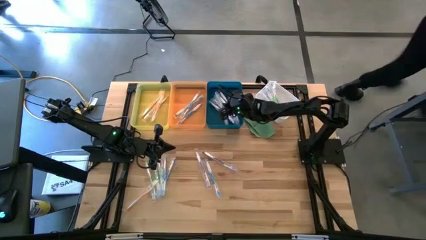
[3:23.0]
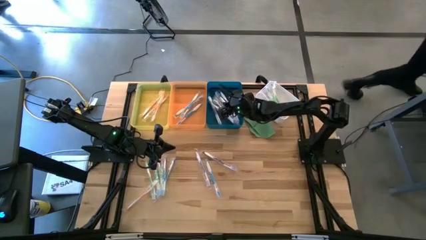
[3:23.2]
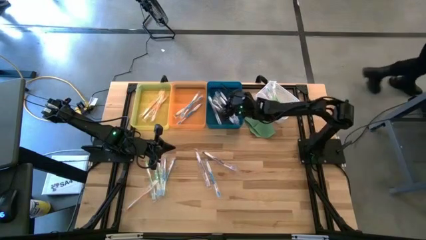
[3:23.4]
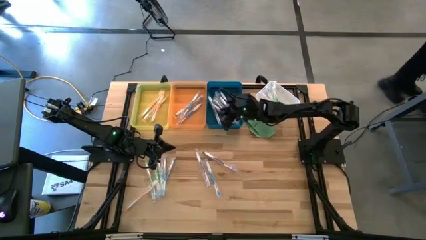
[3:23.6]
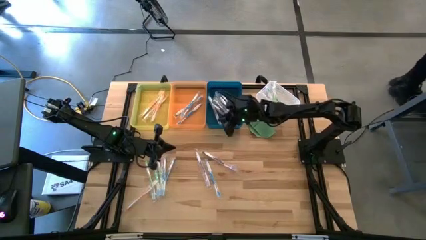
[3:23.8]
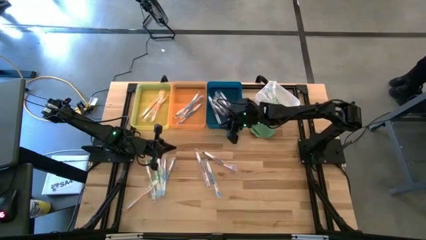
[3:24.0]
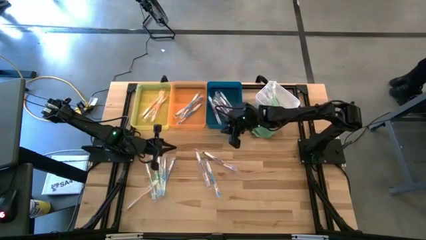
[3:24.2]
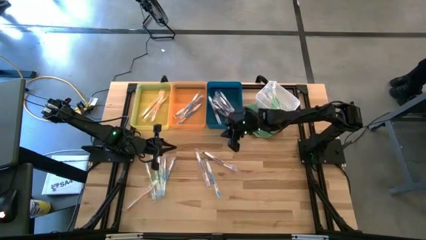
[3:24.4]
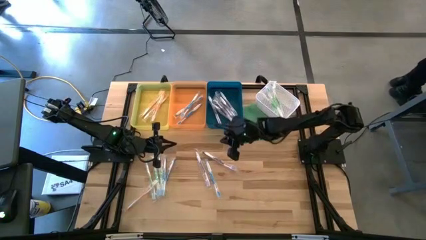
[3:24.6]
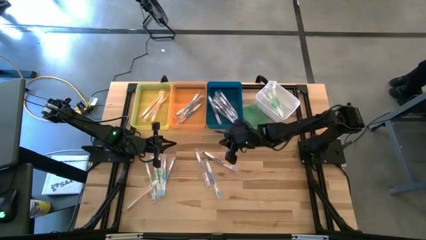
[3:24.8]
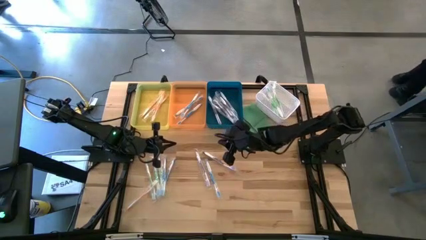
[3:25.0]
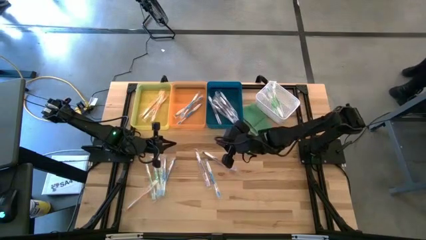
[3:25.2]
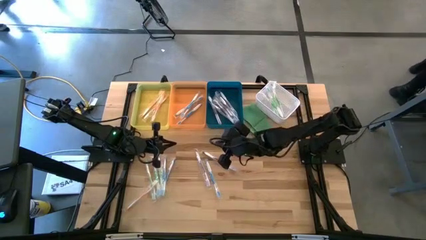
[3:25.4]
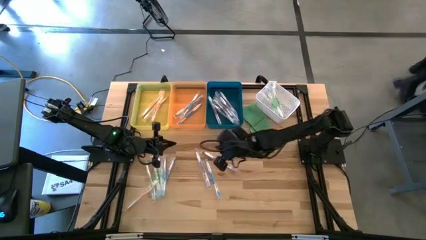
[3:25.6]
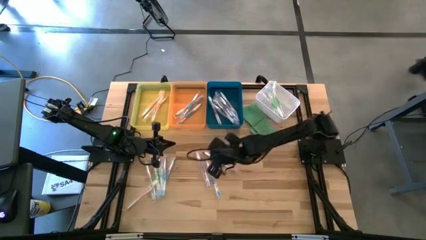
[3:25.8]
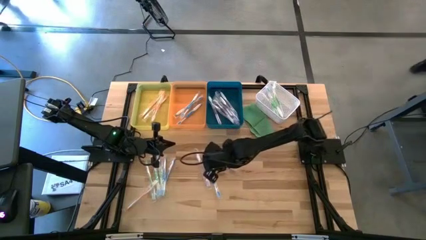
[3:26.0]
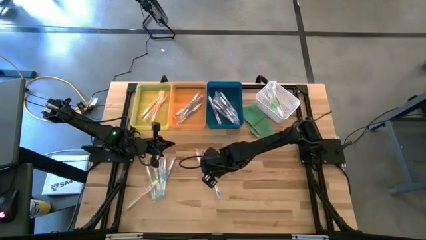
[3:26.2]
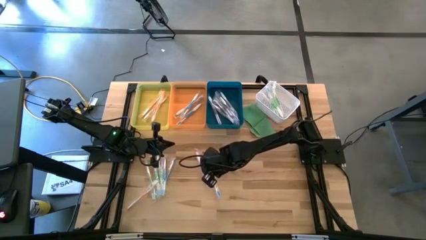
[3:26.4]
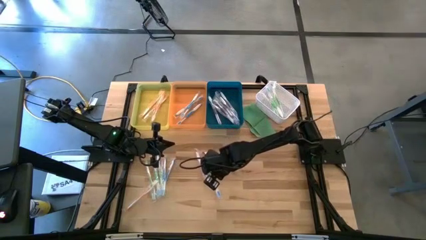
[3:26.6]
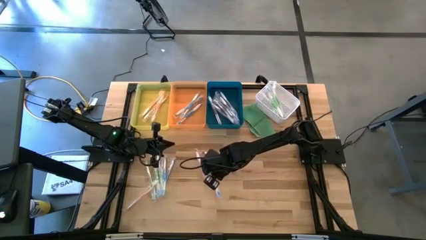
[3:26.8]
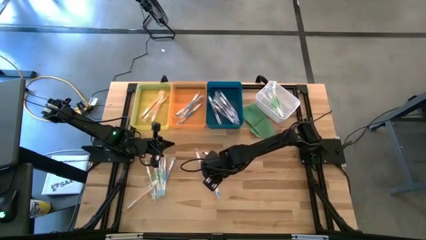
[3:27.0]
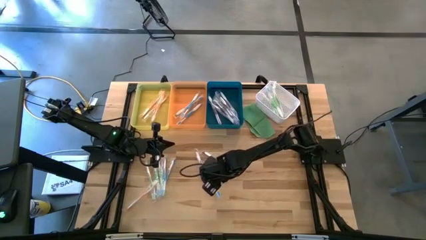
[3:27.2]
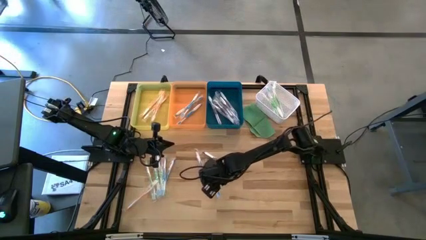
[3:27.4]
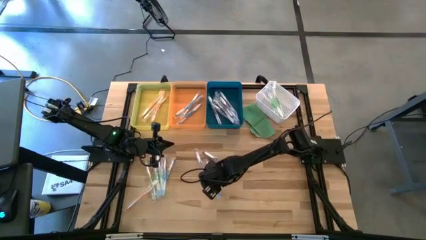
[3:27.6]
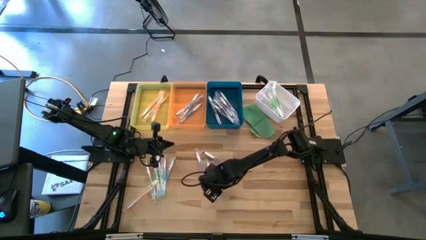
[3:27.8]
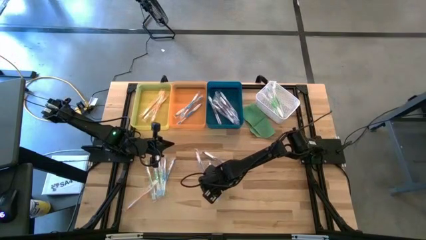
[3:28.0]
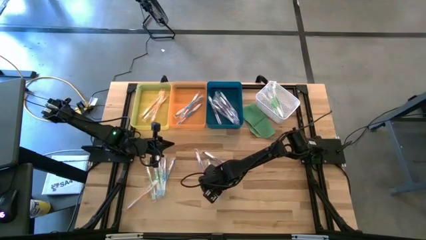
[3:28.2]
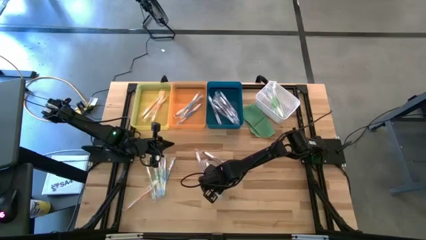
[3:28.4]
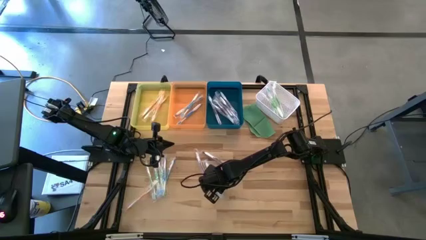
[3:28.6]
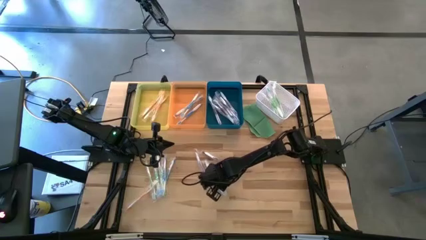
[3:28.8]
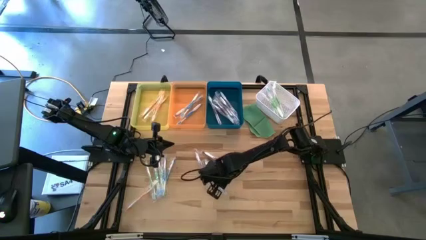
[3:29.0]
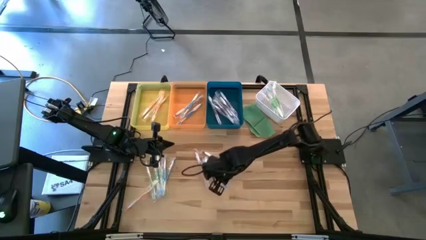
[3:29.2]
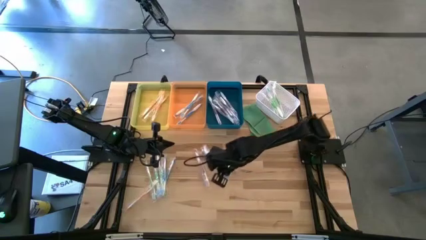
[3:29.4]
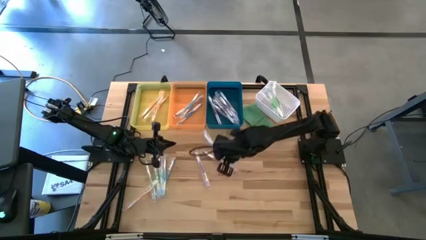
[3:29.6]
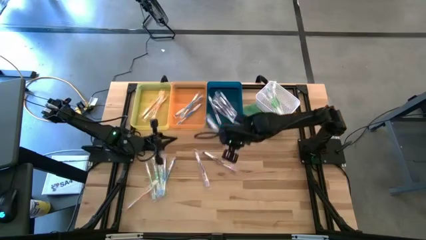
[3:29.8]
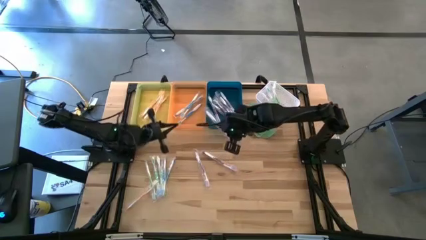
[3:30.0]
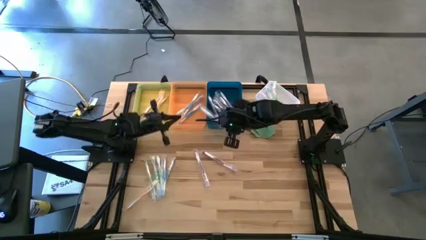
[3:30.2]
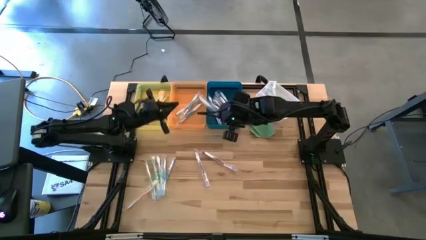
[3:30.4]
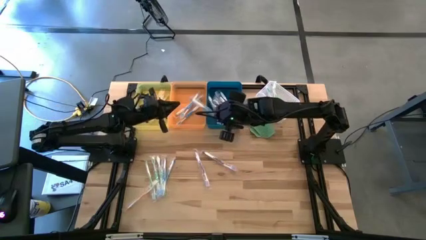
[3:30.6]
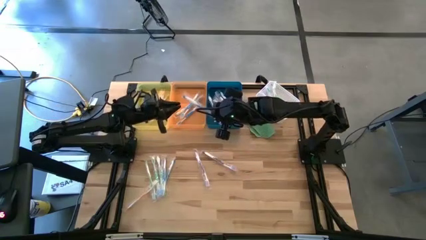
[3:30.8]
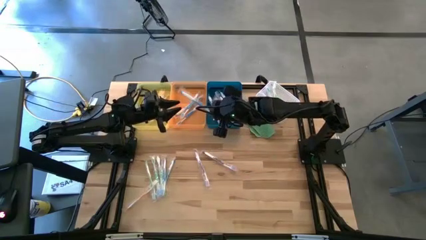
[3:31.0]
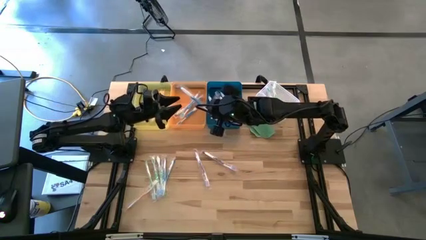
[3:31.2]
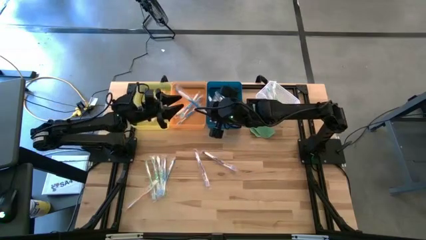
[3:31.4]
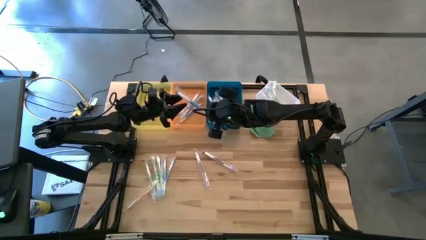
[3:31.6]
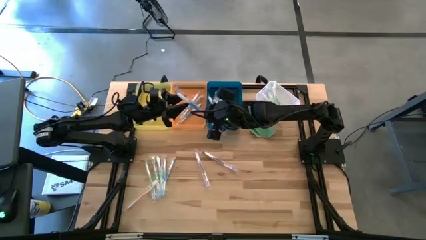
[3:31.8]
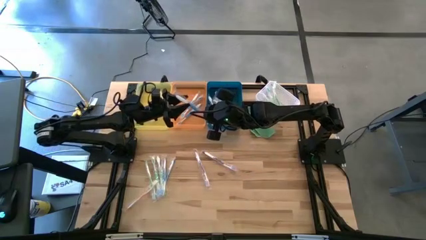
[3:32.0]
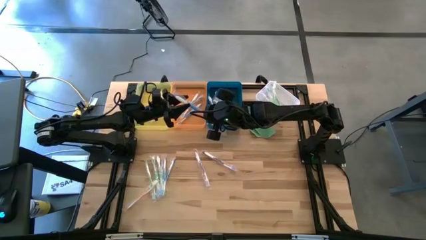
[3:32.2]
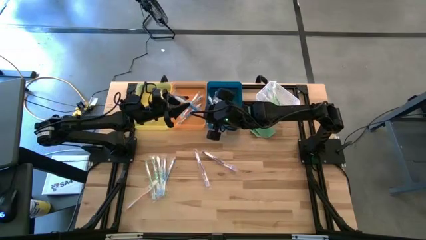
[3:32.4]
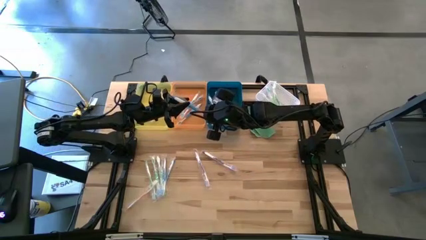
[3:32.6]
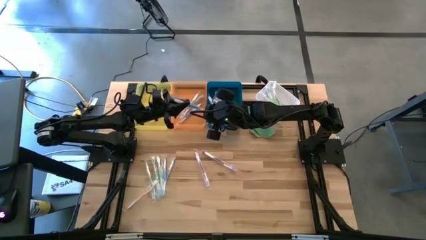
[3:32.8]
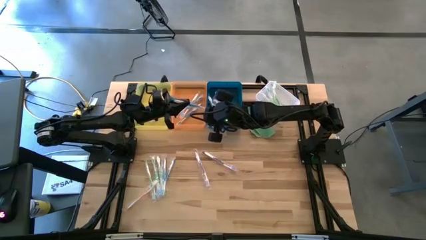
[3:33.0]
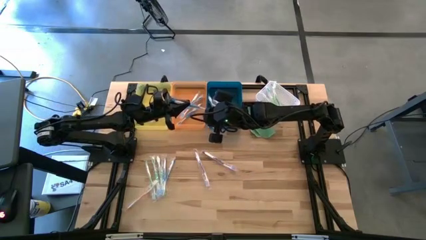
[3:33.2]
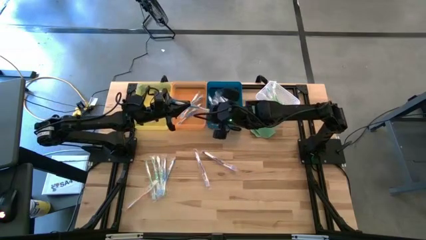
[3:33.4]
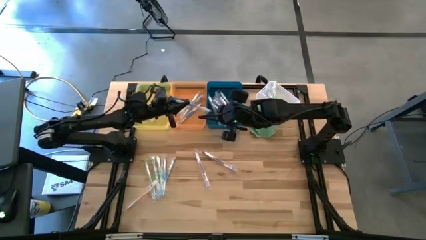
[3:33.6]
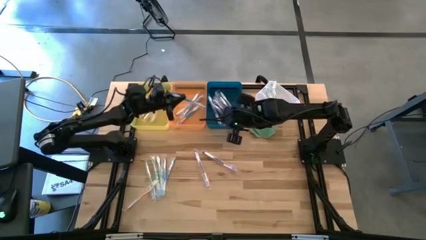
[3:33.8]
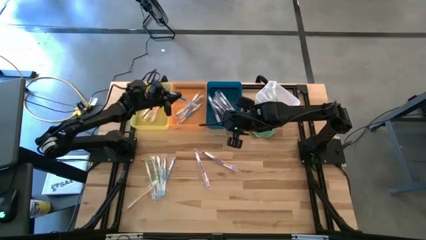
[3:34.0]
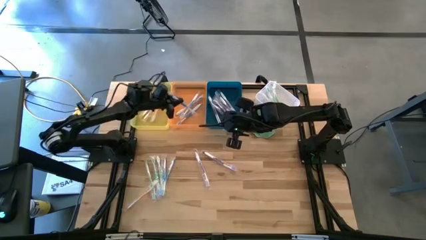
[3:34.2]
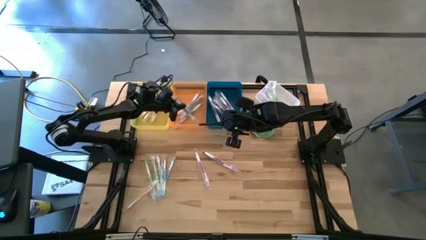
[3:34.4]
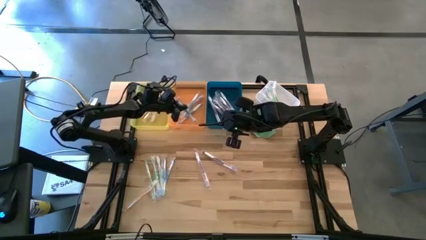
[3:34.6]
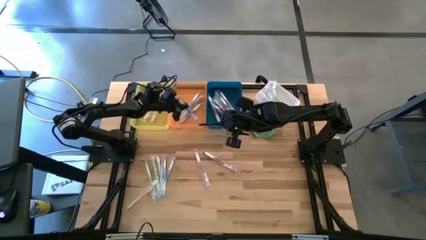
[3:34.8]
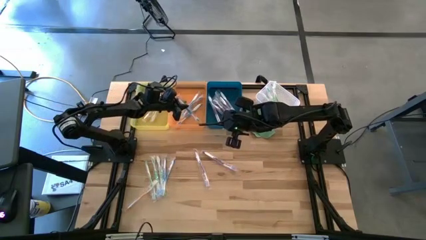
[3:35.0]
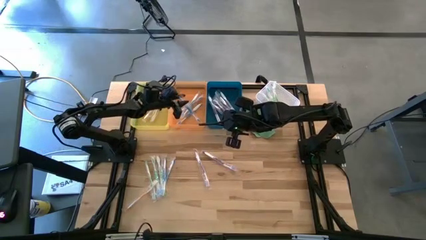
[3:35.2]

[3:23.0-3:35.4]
Task: Pick & Place Toothbrushes
Put the blue toothbrush into the orange bin

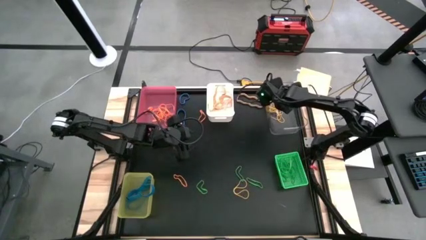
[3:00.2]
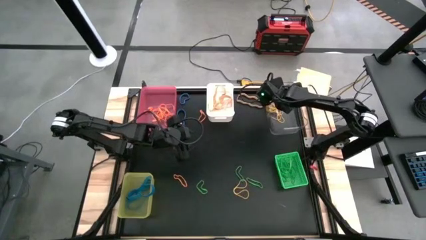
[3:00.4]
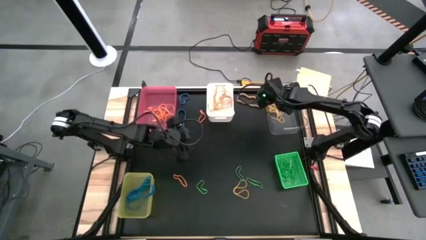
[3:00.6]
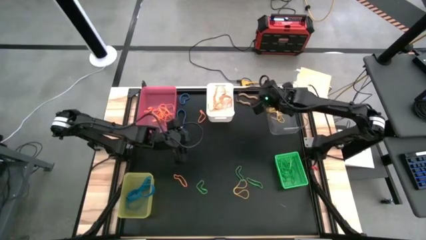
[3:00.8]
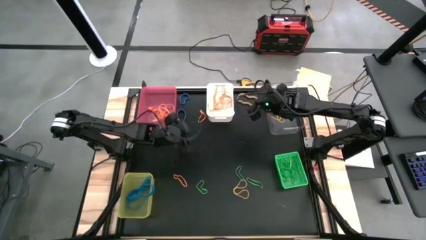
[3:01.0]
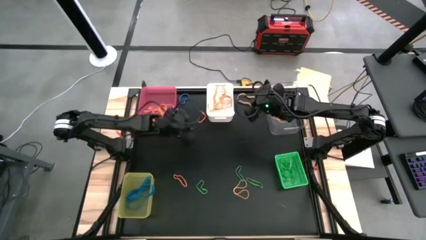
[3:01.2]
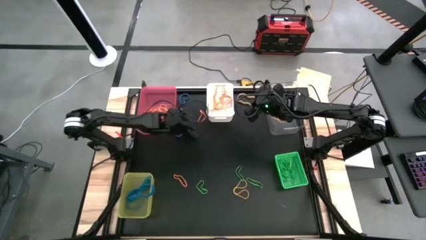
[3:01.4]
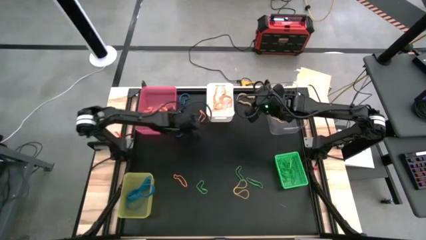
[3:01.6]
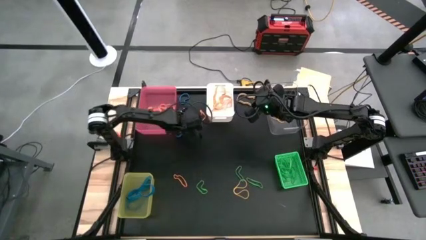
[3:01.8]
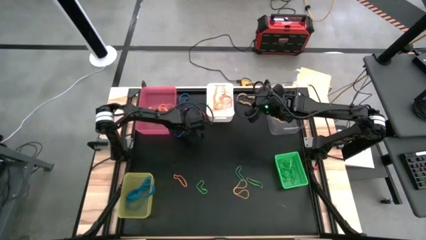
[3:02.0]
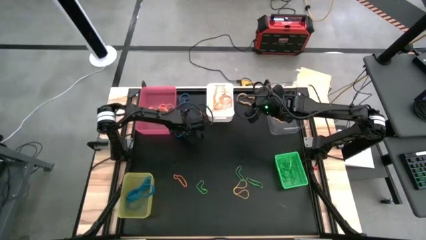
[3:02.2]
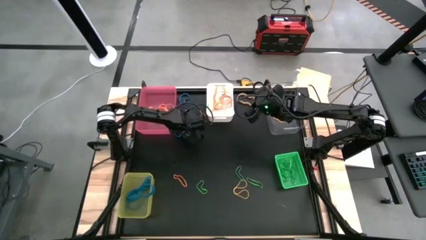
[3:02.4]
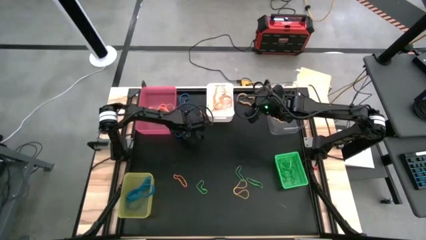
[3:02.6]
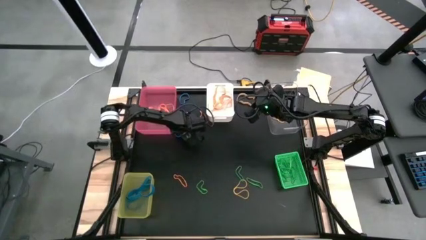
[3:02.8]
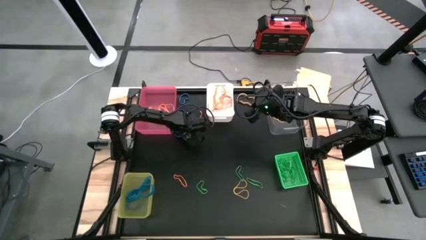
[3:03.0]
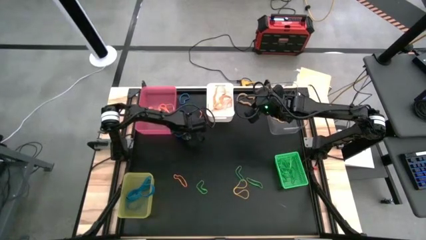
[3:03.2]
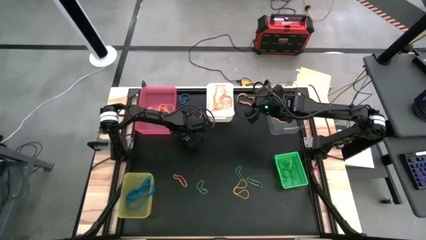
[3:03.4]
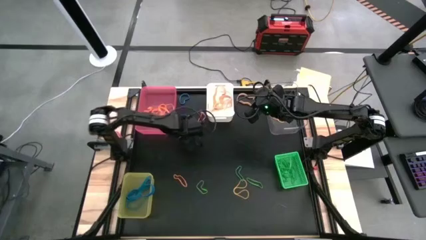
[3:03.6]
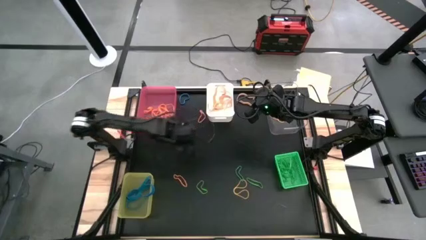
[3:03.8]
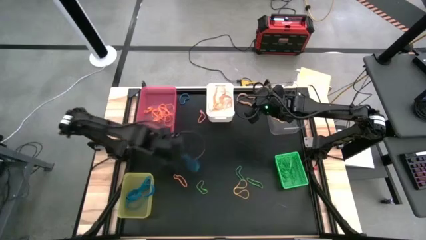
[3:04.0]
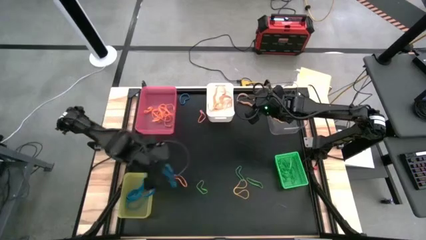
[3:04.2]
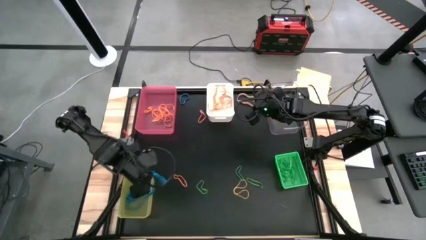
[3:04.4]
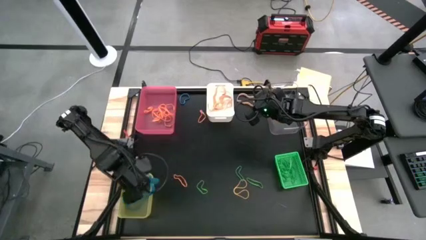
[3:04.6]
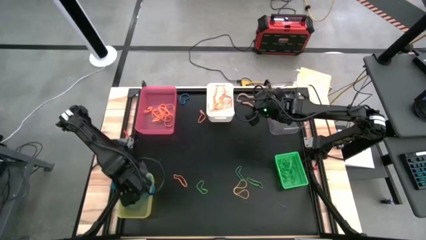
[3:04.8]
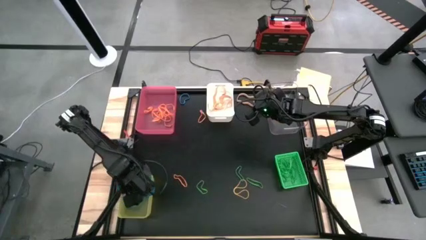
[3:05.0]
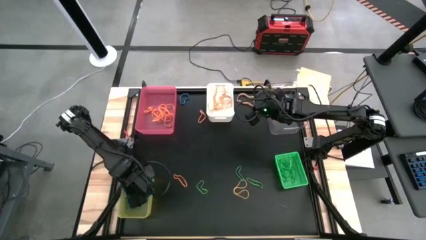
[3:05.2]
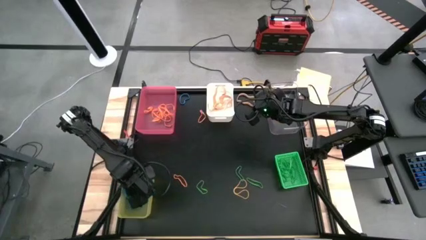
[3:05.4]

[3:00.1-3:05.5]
Task: Sort rubber bands into baskets
Put the blue rubber band into the yellow bin
